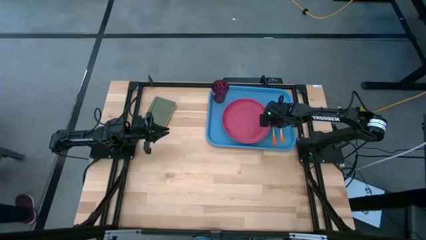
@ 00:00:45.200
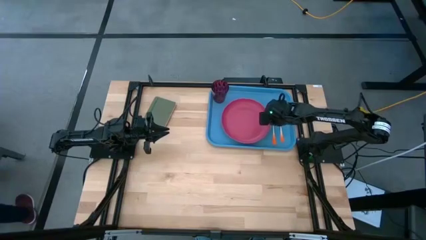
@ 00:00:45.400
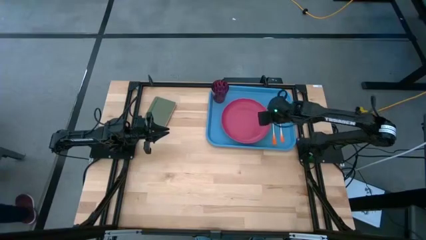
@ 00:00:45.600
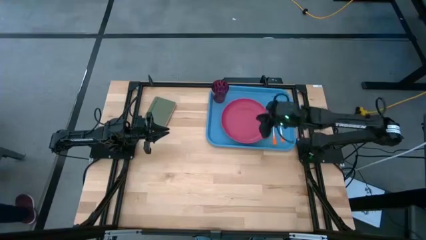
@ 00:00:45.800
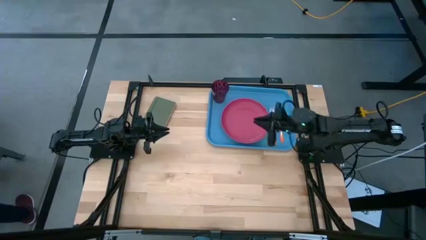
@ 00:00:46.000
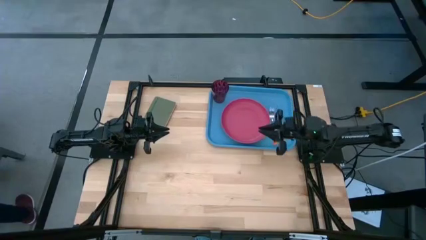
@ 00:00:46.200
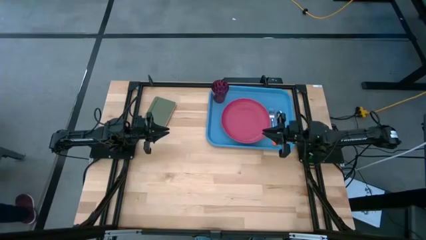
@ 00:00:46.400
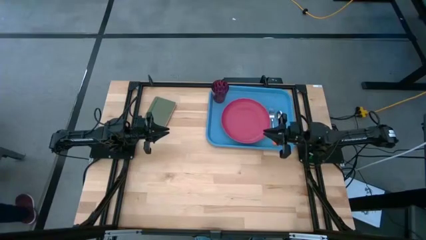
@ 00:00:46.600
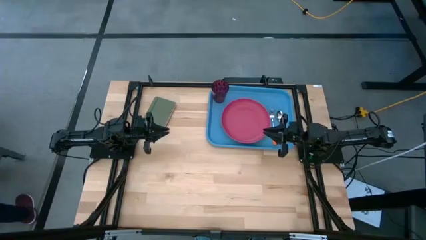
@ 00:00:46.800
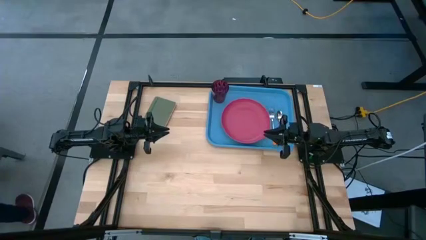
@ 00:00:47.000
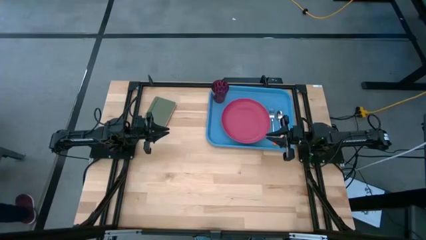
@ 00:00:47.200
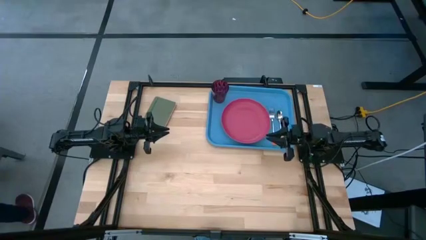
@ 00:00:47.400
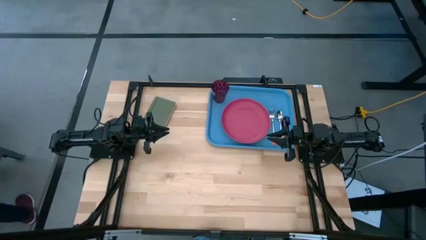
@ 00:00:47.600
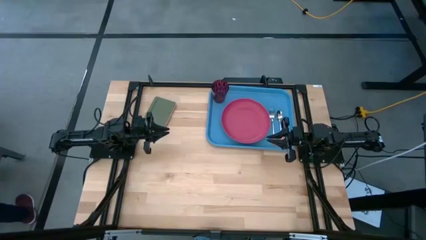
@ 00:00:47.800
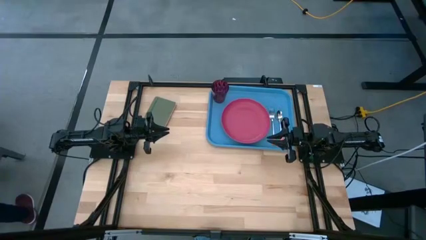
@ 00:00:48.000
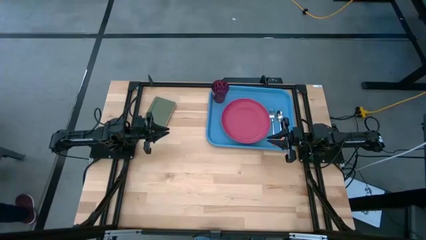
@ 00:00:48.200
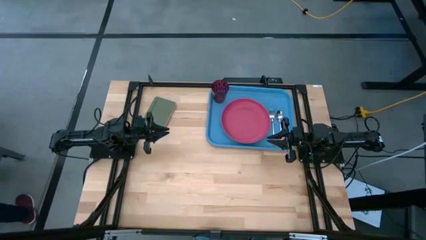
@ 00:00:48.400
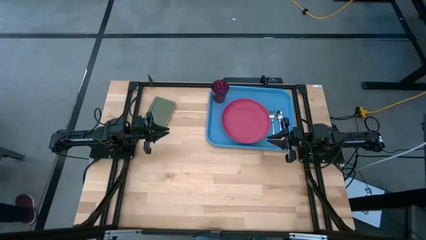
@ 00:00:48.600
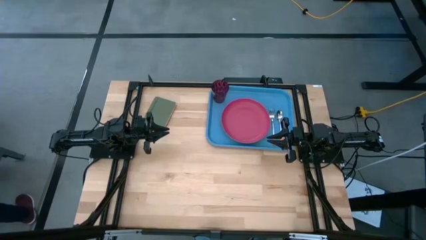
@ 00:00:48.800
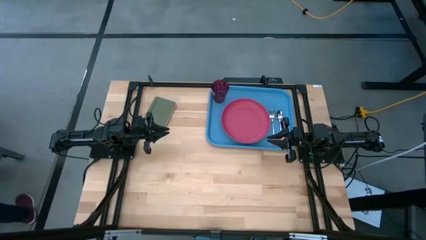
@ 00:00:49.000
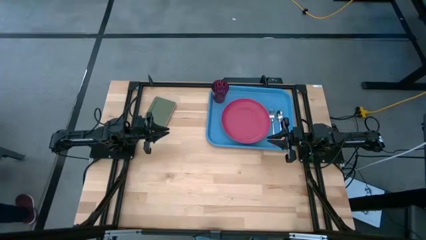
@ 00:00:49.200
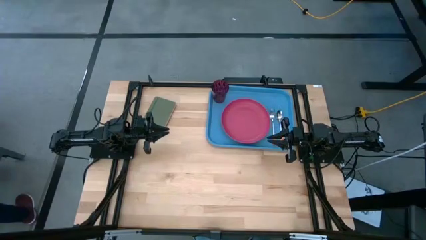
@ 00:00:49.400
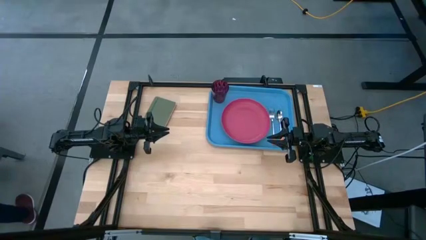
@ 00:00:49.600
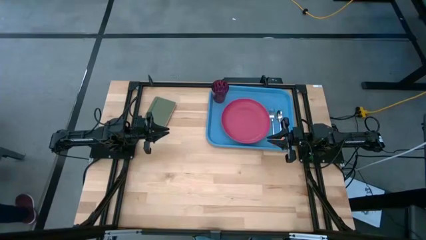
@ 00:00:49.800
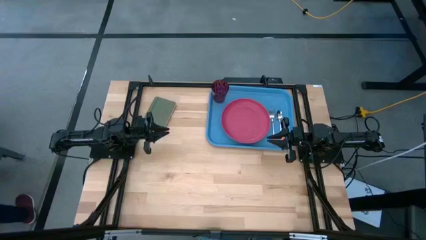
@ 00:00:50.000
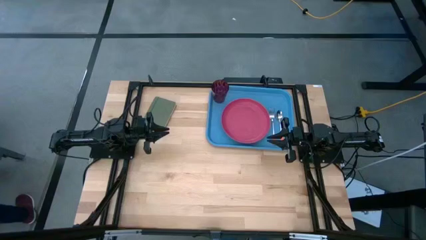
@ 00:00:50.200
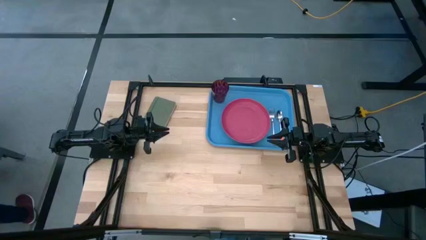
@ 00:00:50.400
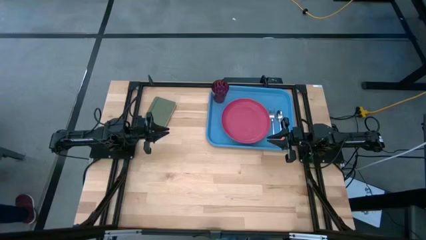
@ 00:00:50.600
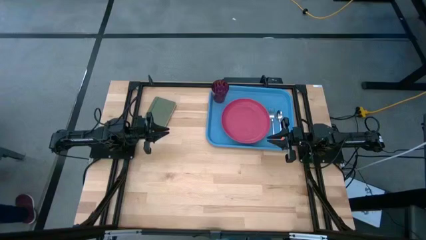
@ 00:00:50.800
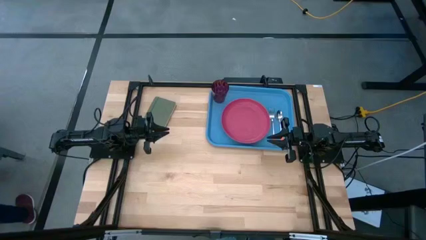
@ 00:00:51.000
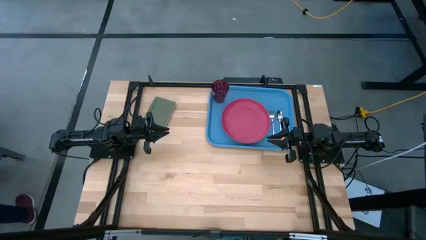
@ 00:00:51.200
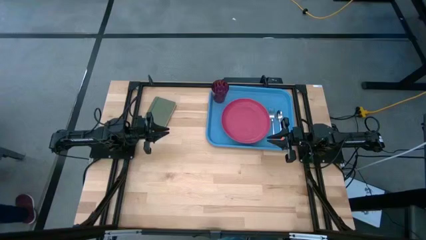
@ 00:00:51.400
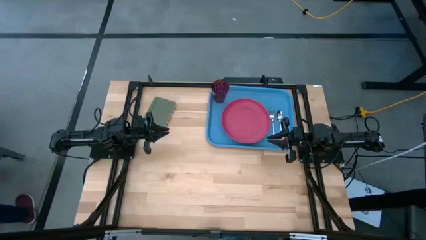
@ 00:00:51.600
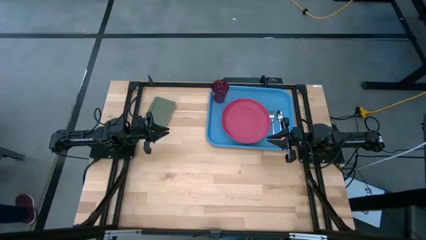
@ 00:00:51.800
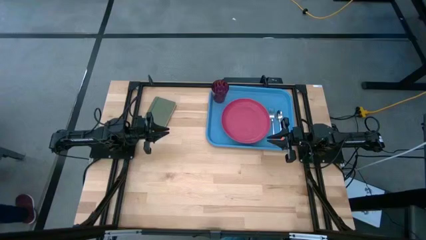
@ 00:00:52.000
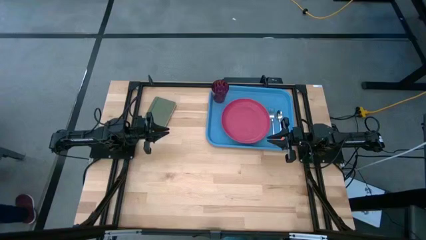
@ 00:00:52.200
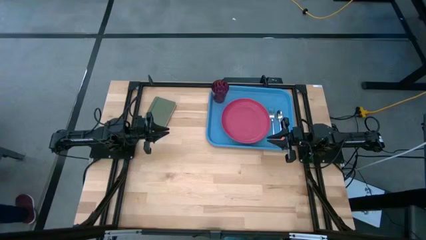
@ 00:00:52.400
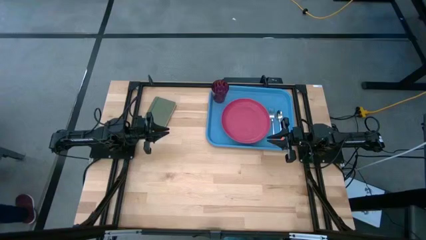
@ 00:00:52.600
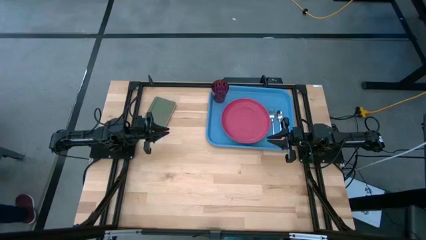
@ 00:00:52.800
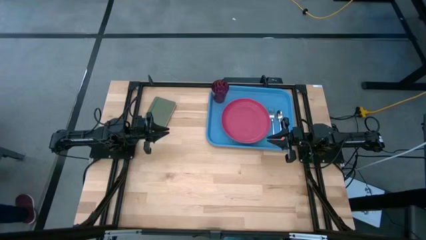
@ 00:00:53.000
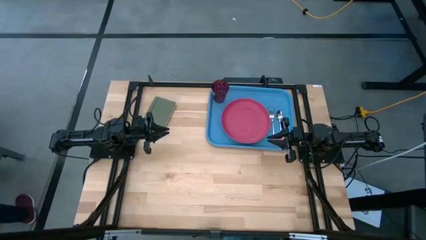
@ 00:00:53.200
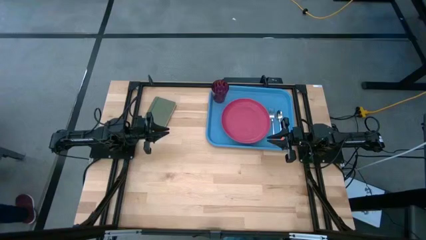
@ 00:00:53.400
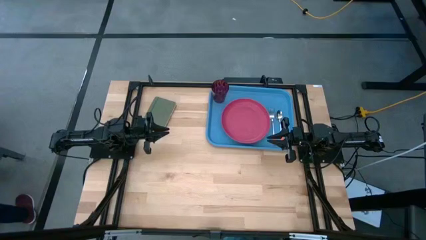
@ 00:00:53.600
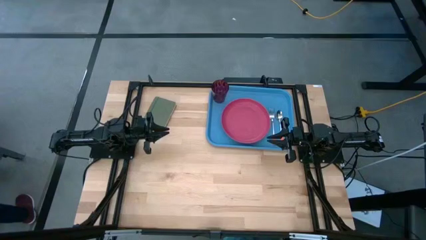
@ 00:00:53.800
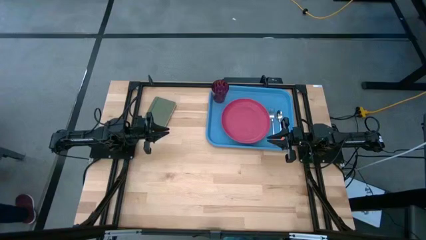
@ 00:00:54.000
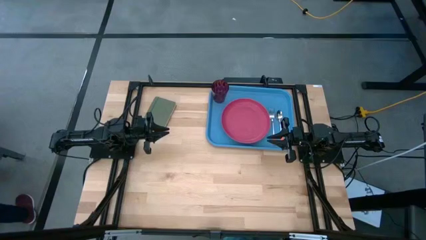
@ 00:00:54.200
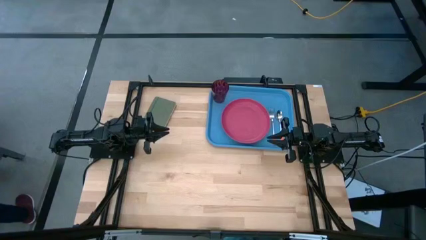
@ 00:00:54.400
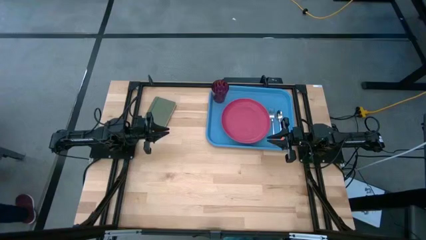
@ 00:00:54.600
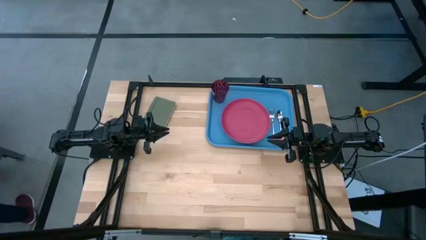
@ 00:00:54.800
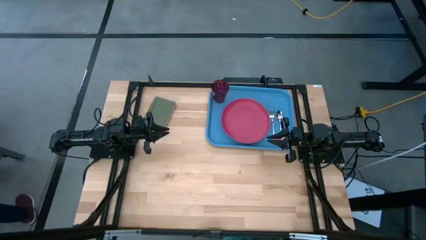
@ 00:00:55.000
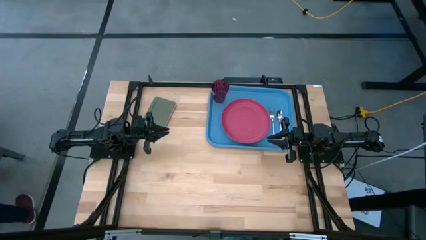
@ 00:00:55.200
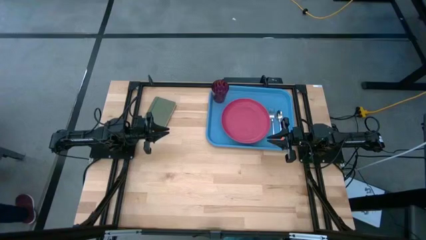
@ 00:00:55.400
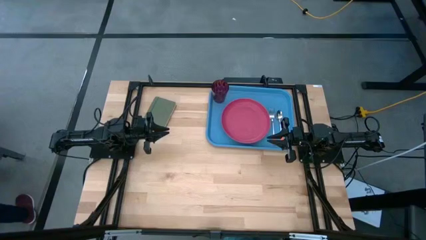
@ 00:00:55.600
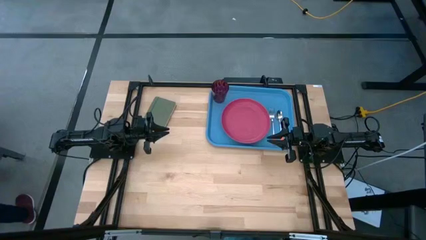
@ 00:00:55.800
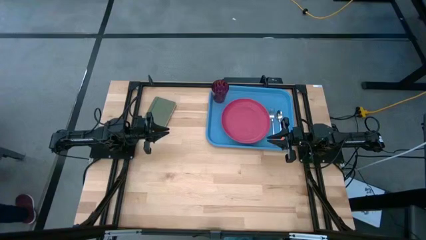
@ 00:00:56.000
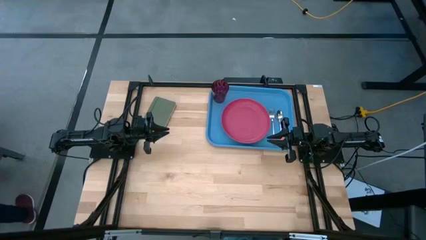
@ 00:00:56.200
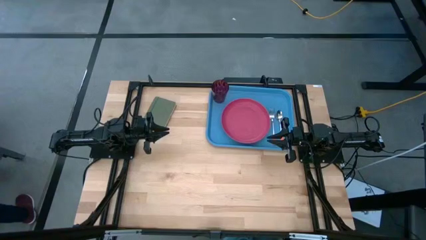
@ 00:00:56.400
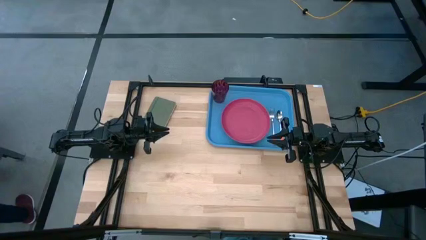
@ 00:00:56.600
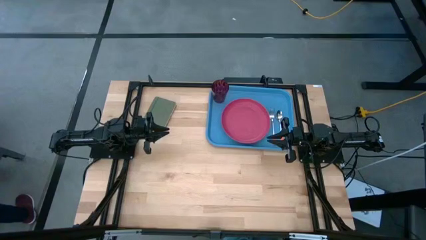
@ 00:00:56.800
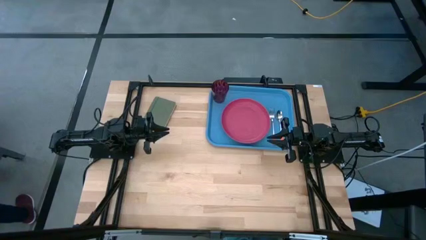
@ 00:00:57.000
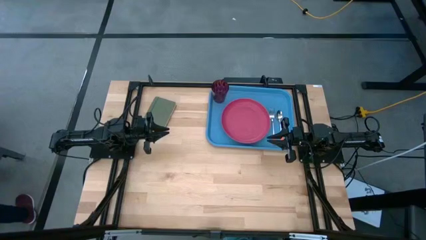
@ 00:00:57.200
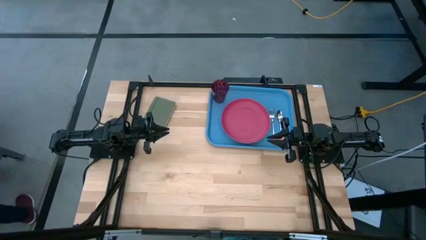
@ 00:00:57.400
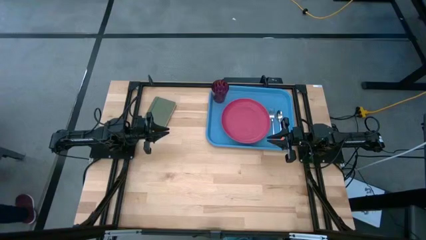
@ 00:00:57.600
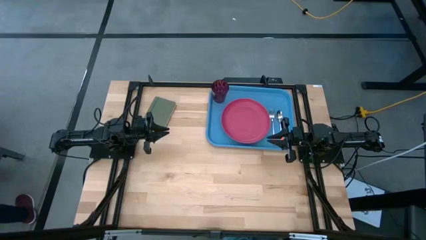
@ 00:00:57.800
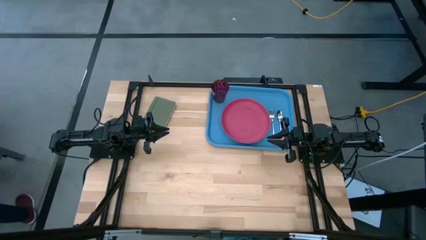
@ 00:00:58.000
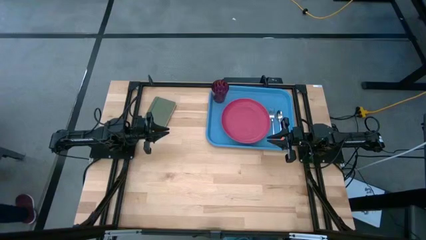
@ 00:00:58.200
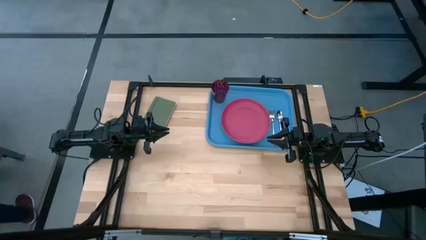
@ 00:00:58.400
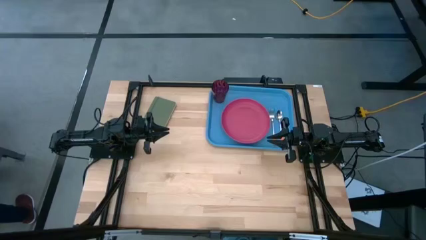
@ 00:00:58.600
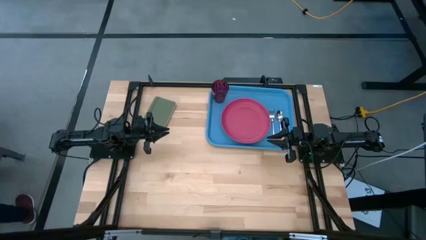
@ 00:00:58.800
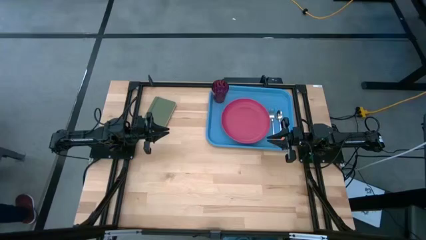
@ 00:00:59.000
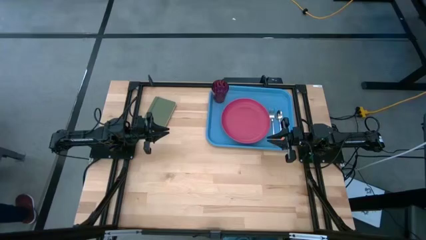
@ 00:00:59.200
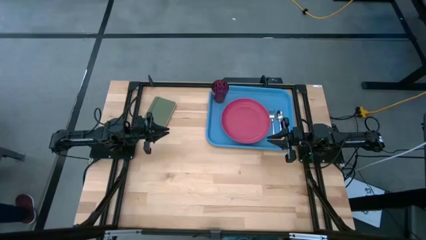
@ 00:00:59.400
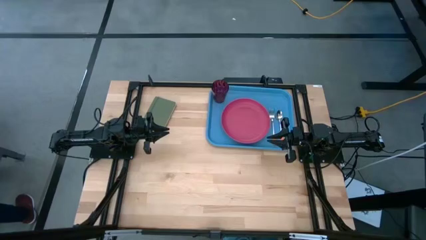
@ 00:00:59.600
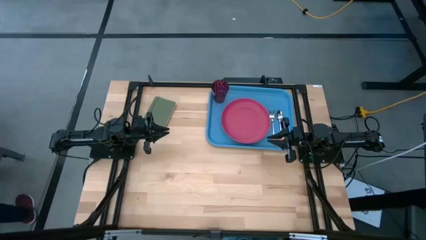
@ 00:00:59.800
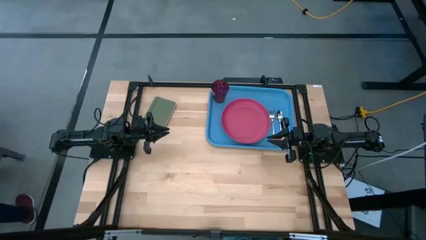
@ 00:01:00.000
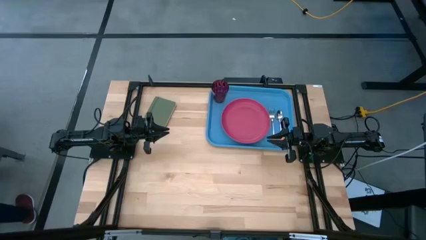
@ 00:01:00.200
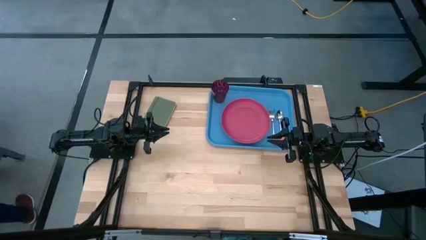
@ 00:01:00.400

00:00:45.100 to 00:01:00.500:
Task: Pick and place plate/cup/fork/spoon on tray
Return to Home Position
